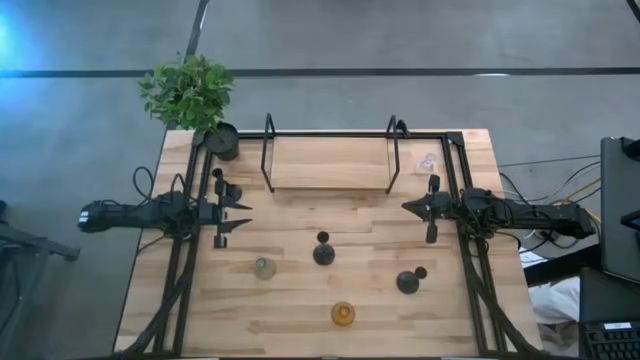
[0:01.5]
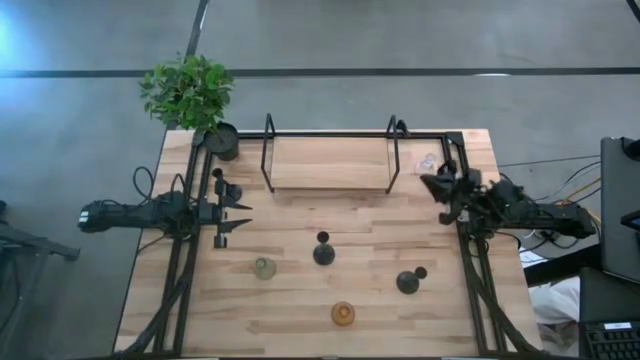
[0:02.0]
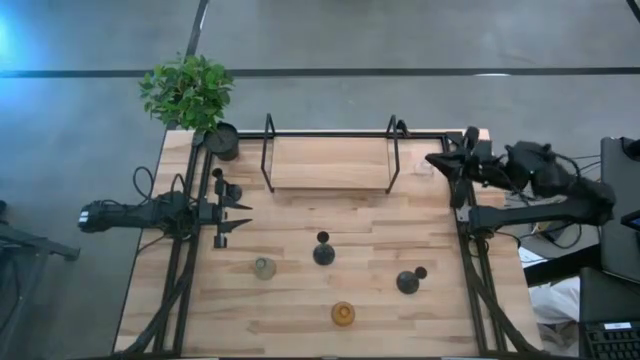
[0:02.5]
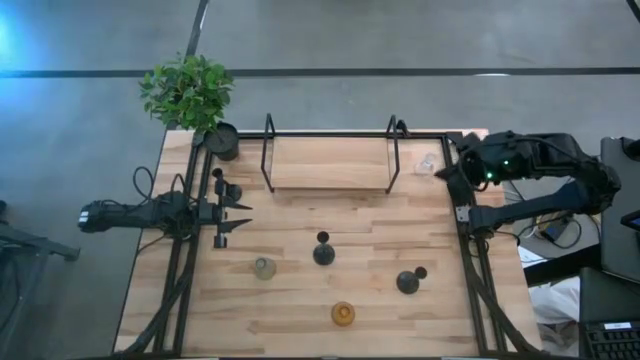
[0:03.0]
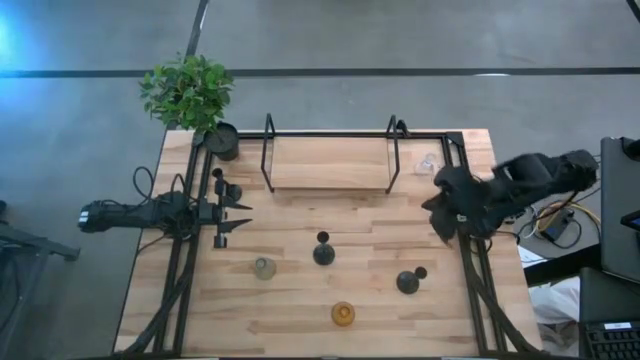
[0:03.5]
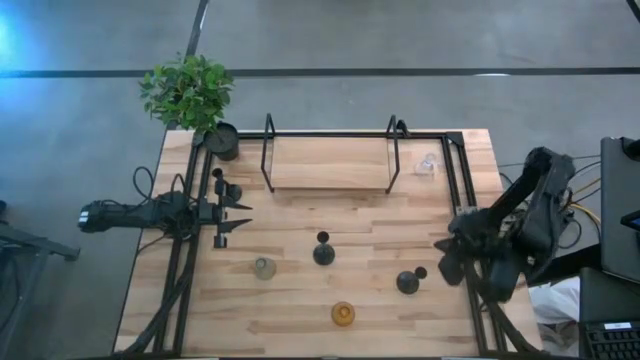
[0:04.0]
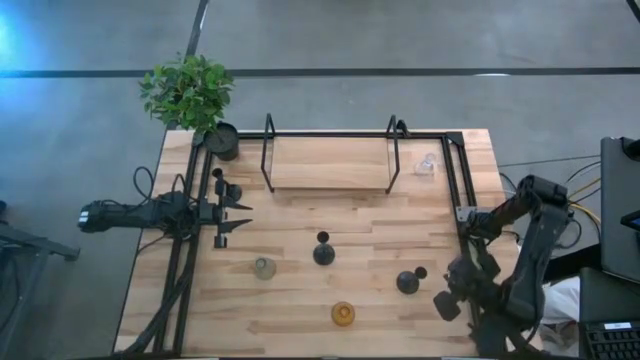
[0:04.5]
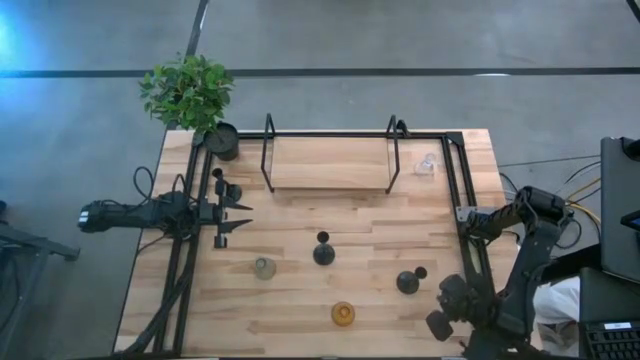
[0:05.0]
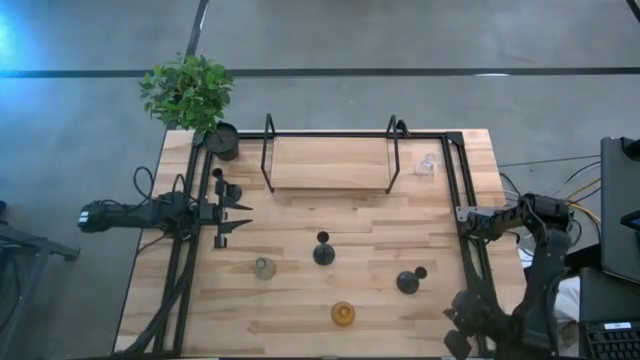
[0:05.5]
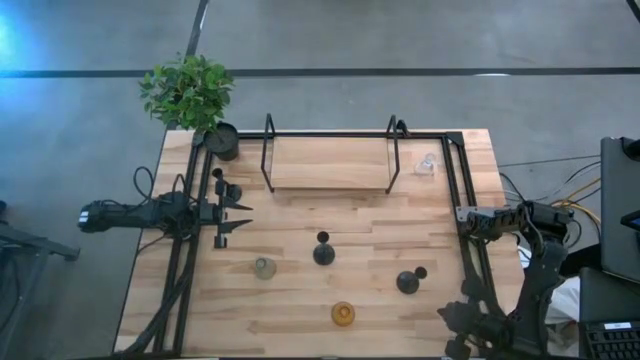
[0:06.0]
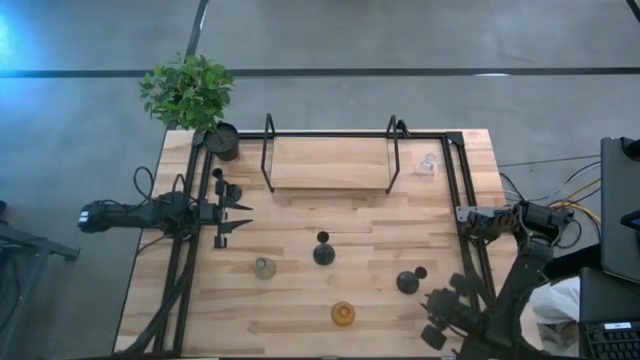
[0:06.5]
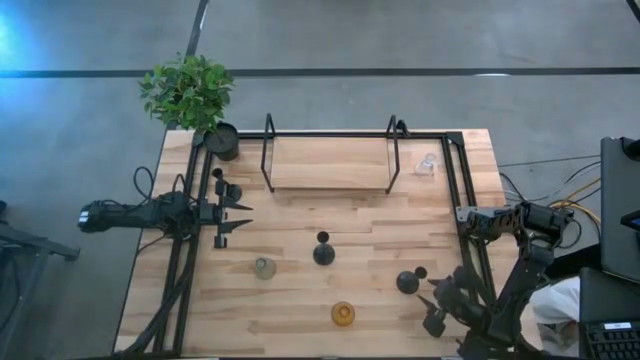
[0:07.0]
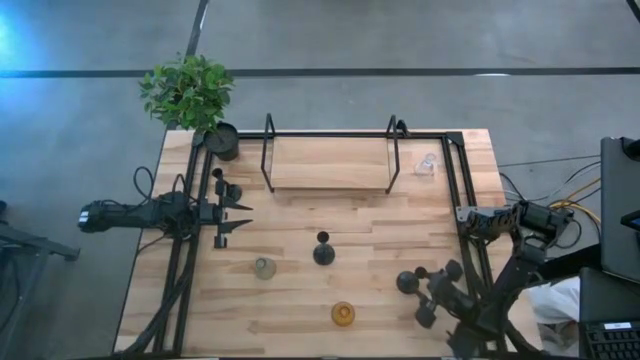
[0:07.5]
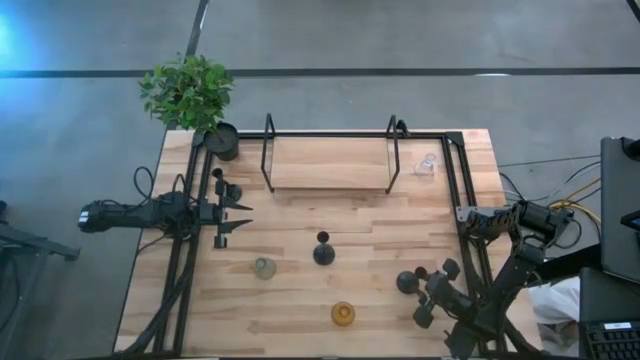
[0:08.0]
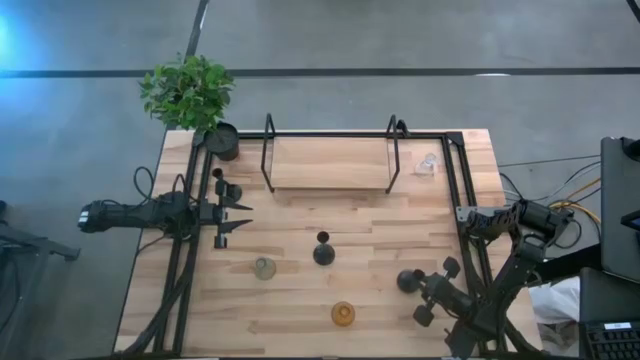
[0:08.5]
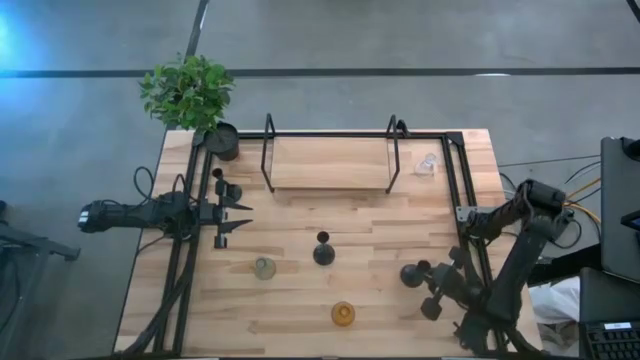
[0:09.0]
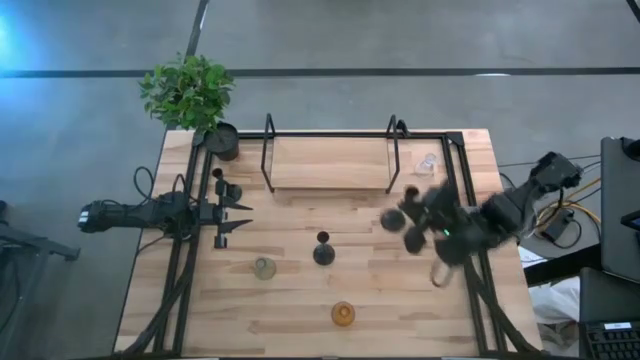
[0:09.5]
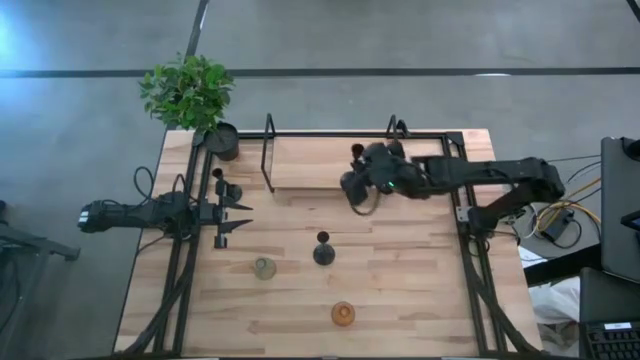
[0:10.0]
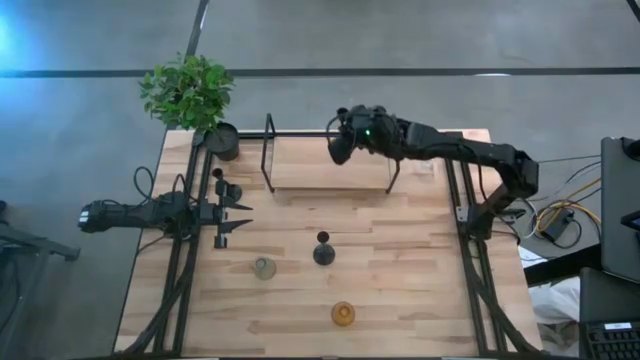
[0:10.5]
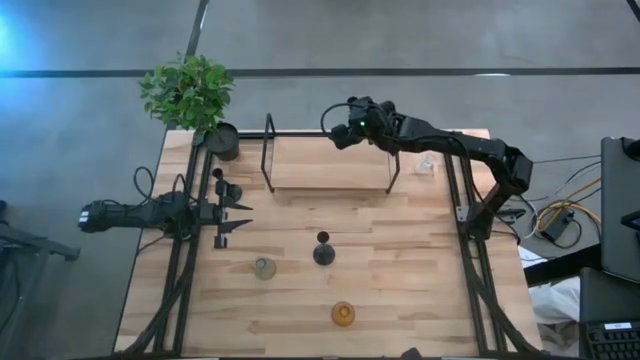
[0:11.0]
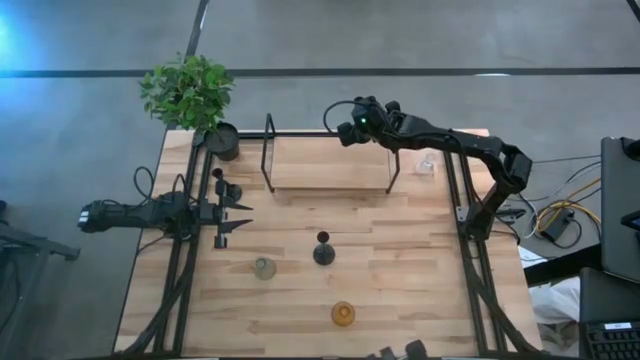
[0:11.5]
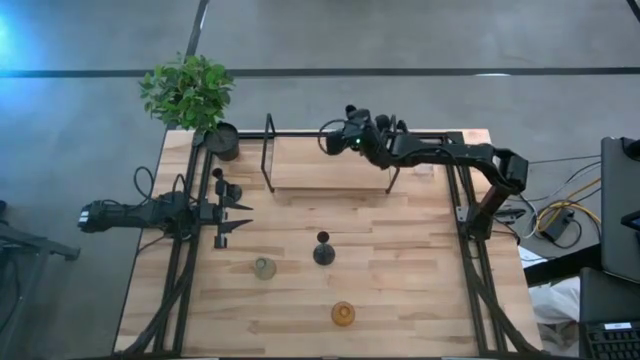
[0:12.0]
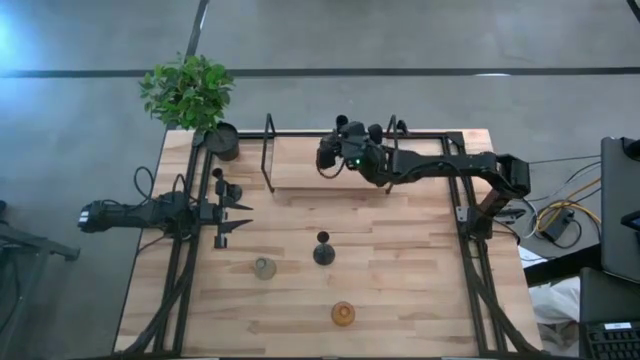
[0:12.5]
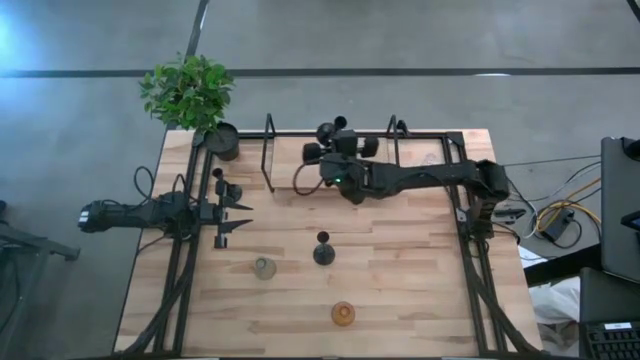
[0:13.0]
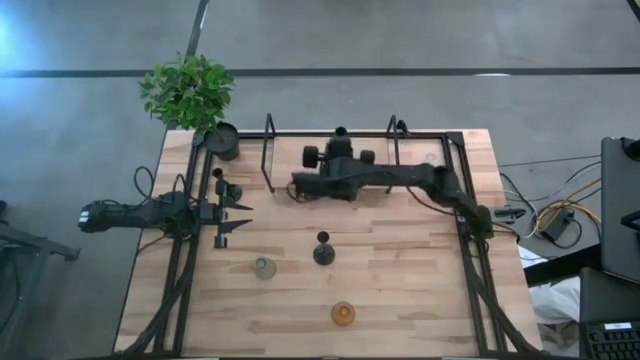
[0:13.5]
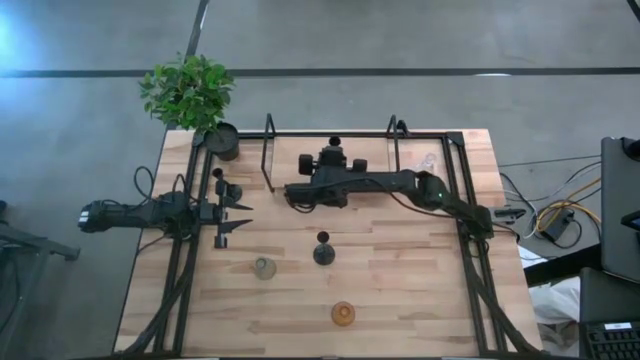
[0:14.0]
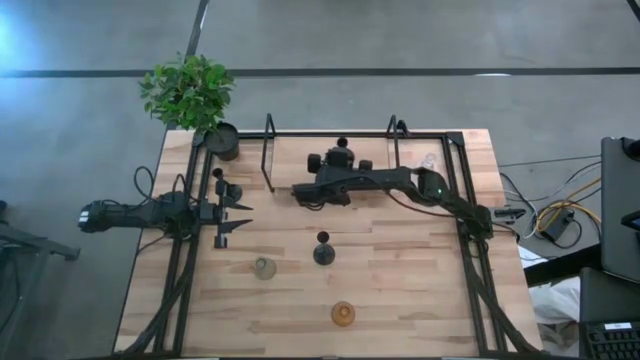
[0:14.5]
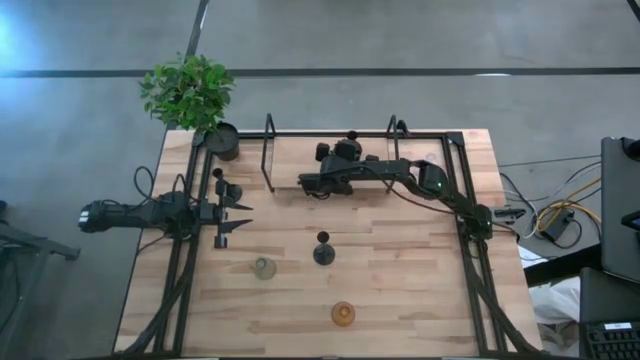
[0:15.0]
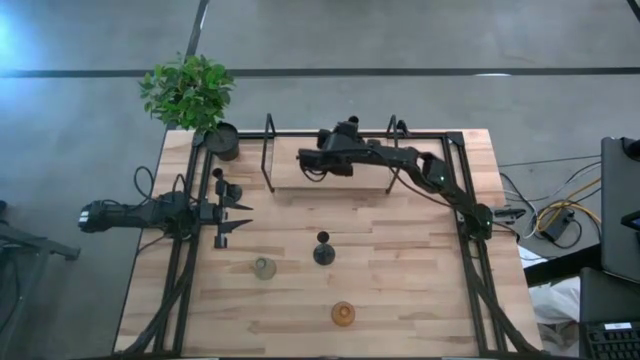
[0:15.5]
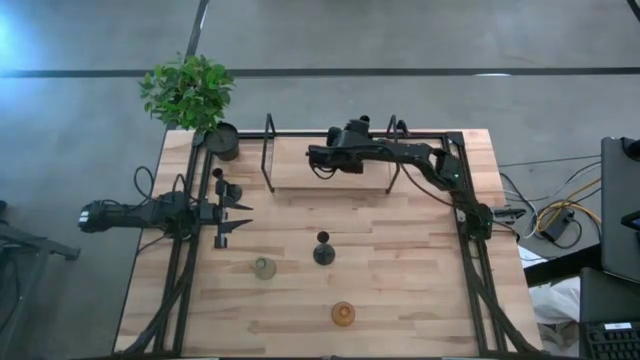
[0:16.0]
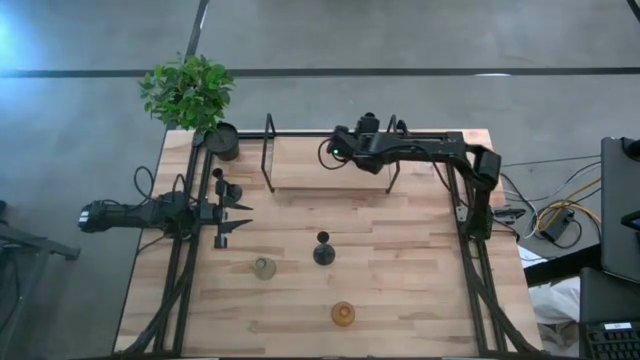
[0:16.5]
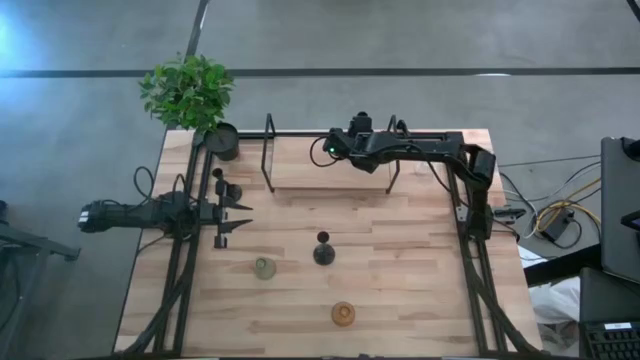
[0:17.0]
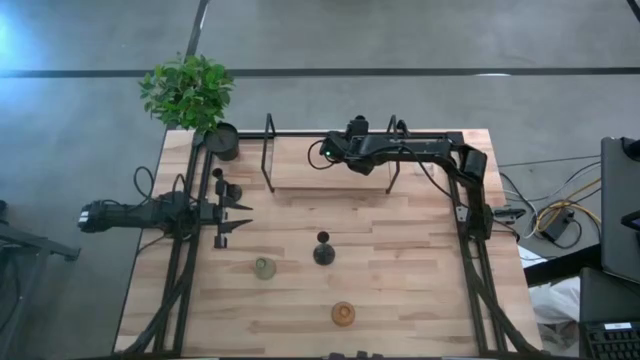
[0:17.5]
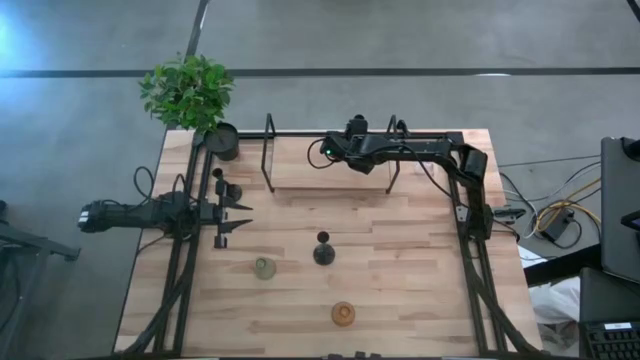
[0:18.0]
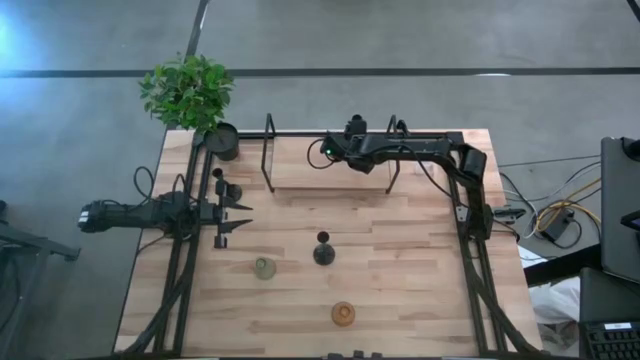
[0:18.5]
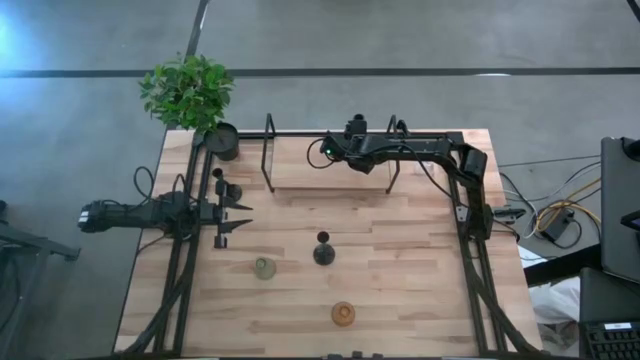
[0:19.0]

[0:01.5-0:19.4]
Task: Pick & Place candle stick holders
Put the right black candle holder on the shelf
